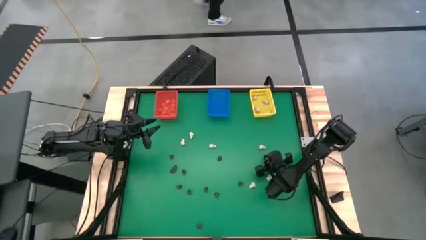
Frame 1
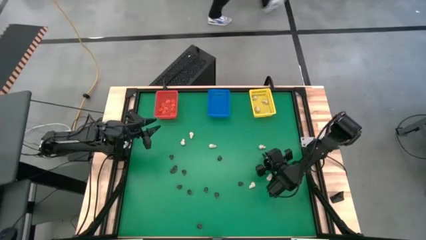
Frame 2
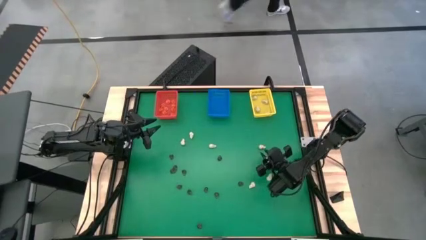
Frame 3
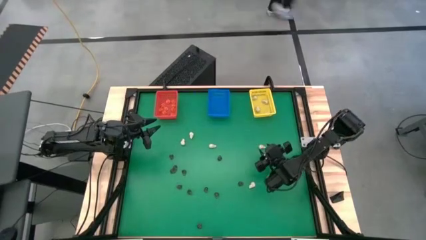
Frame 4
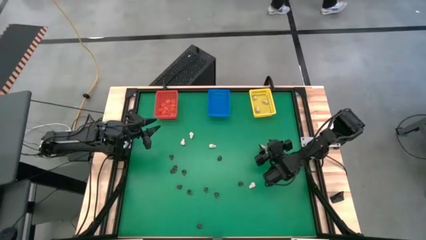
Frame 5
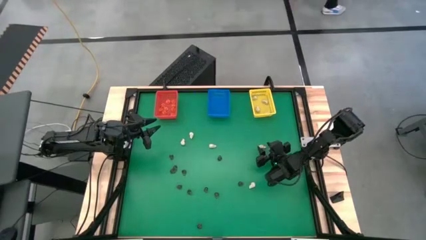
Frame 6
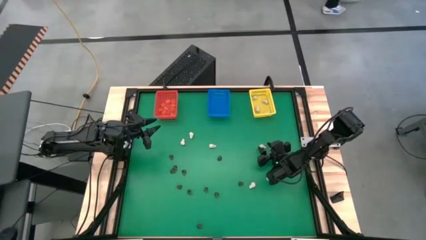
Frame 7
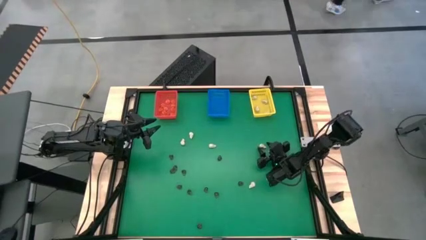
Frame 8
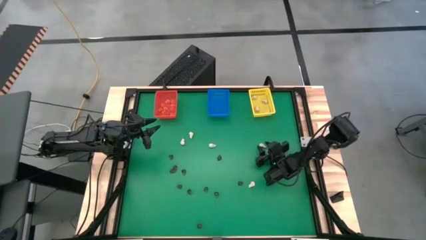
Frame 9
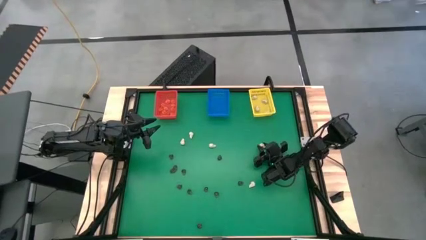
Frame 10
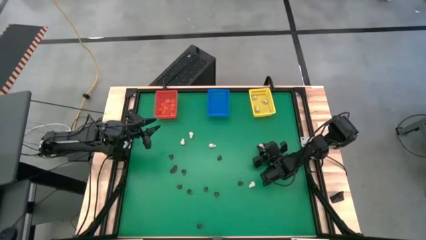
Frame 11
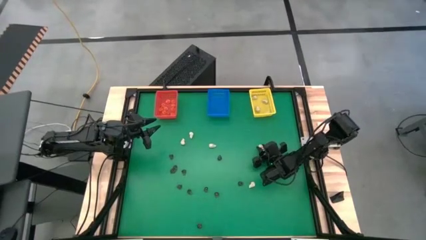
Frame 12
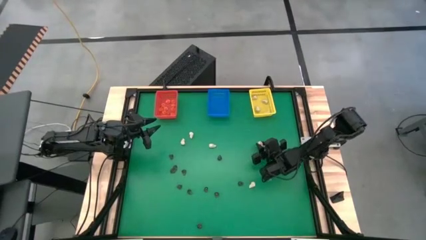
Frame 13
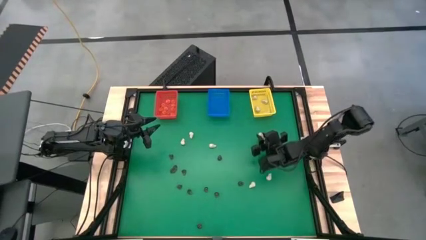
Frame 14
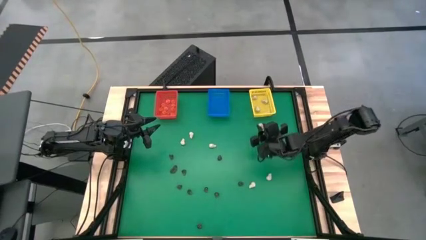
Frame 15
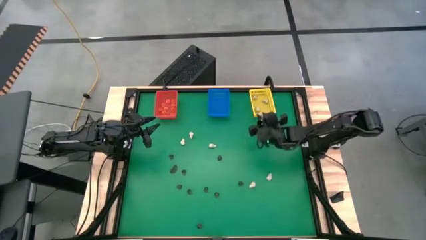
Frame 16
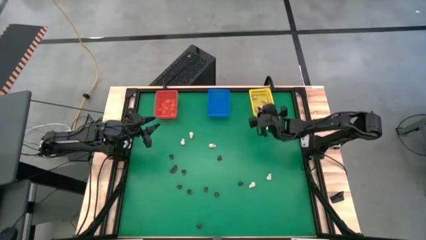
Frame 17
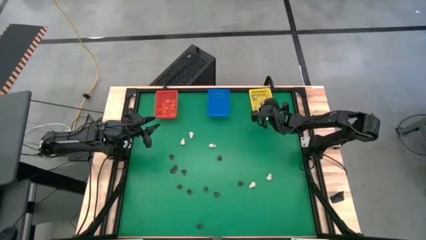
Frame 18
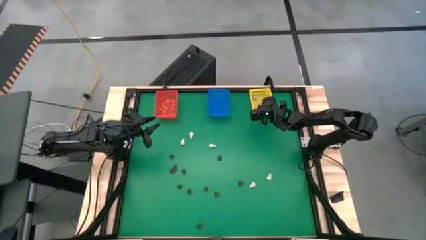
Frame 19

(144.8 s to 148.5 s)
Task: Sort Halloween decoration
Put the white skull toy into the yellow bin

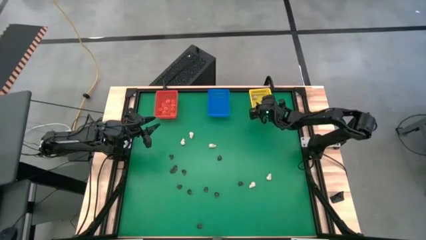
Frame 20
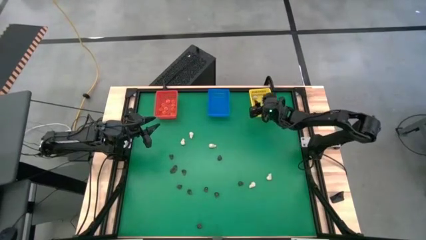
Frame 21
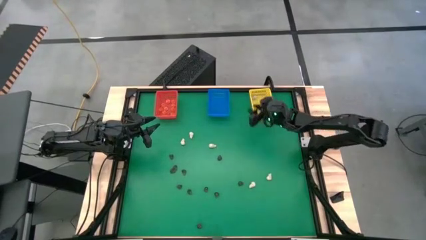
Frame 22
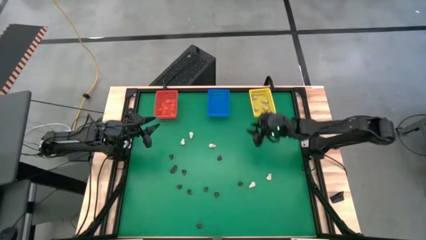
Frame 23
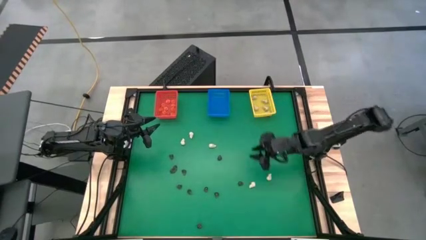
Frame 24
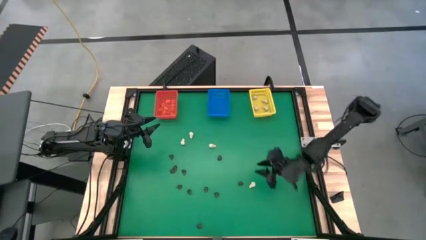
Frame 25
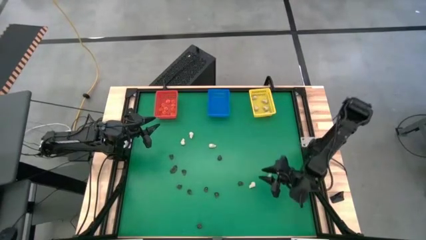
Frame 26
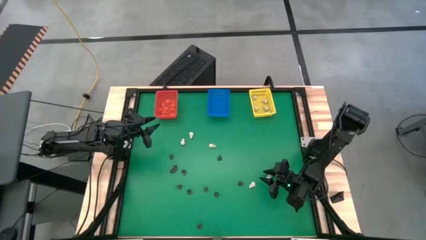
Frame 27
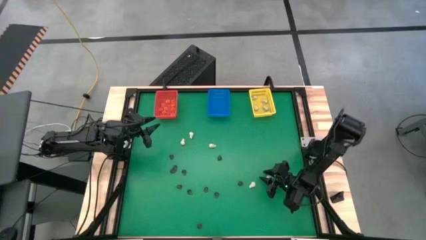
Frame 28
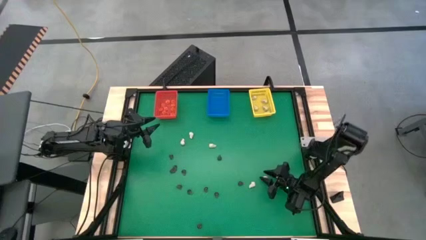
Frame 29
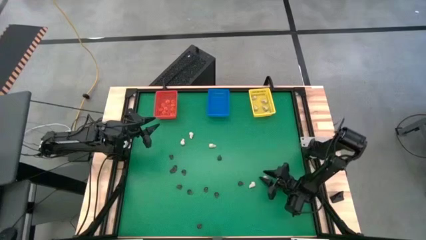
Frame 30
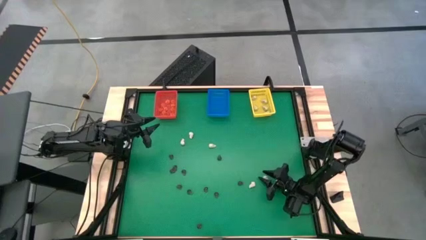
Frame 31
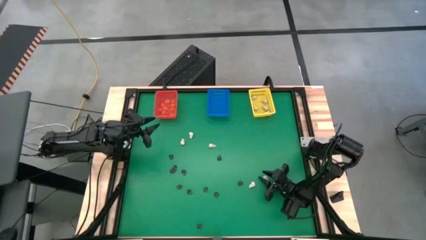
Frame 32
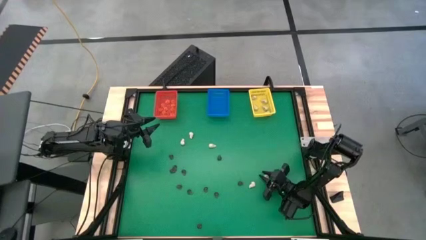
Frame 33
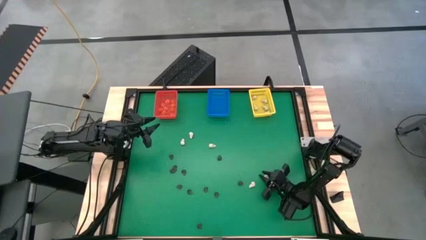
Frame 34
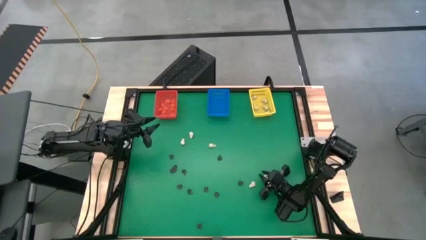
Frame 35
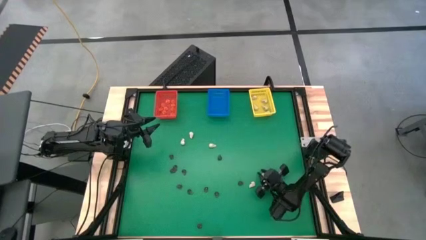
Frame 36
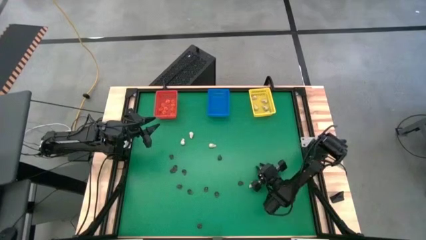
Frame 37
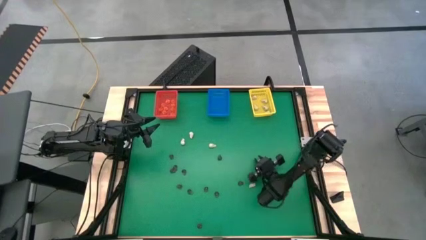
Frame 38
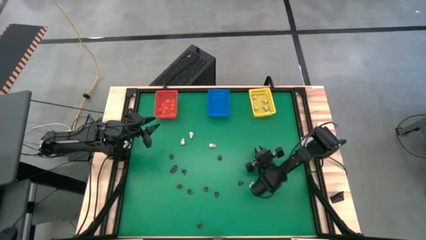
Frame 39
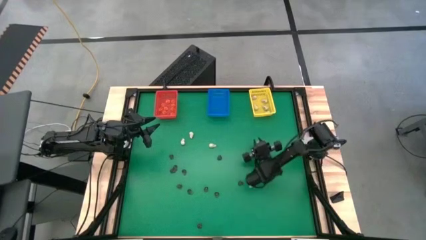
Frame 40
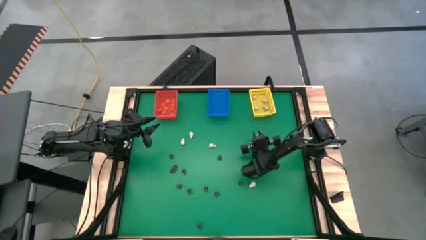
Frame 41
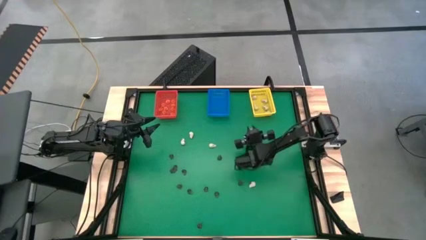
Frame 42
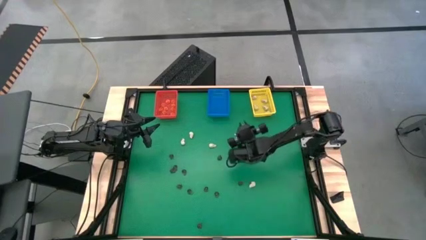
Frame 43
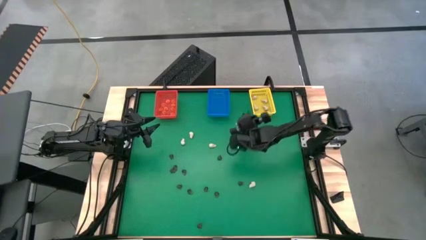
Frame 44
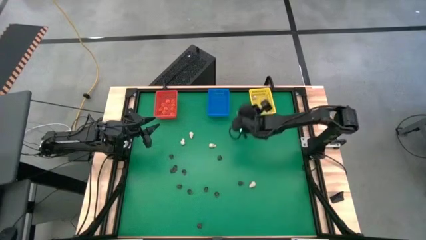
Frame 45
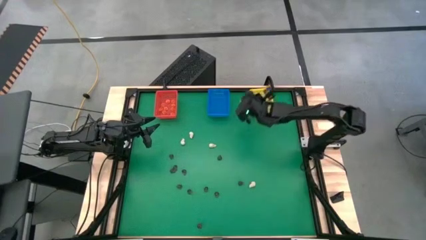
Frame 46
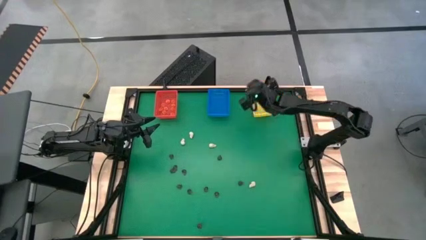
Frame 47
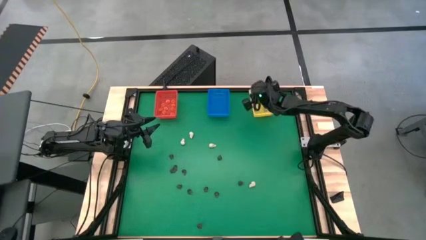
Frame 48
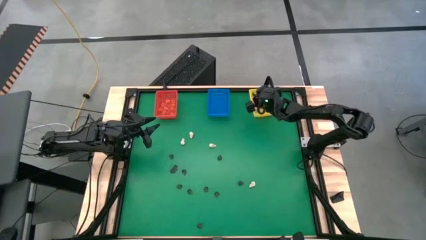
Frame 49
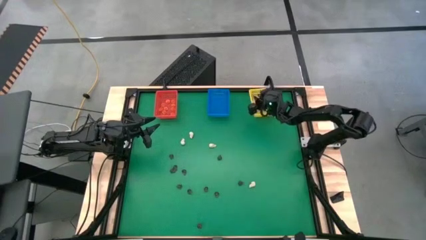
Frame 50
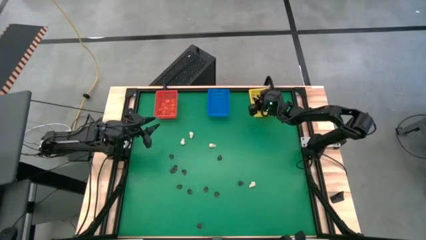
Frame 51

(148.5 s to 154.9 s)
Put the white skull toy into the yellow bin

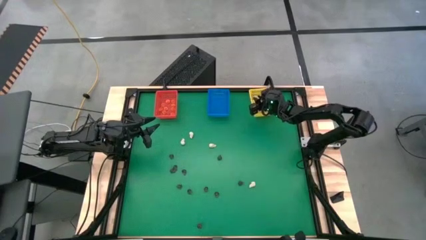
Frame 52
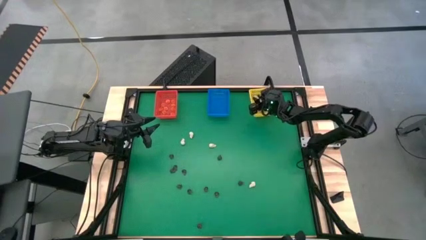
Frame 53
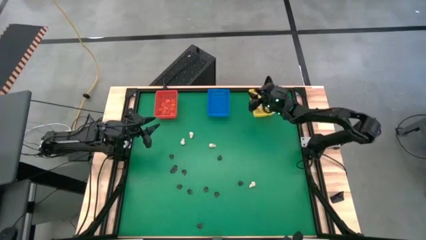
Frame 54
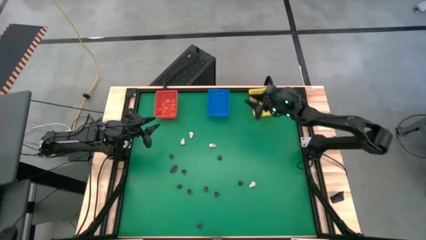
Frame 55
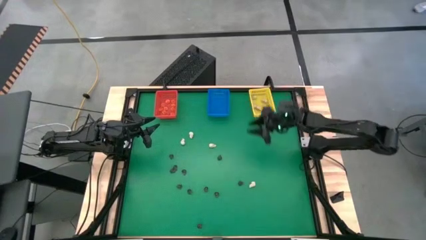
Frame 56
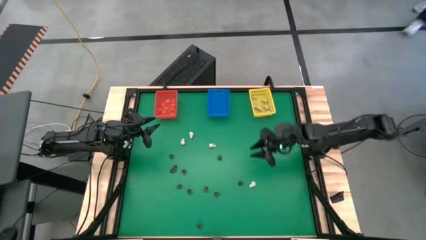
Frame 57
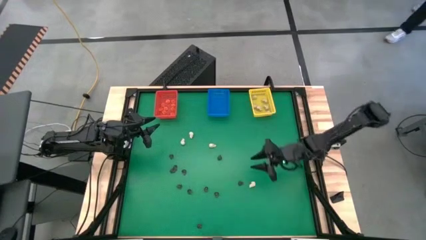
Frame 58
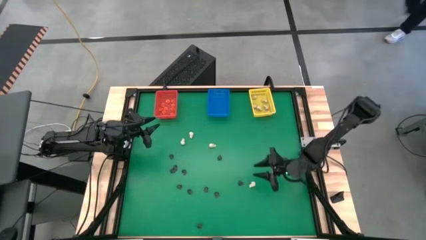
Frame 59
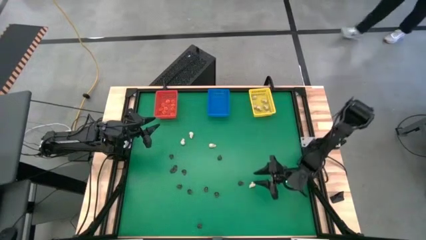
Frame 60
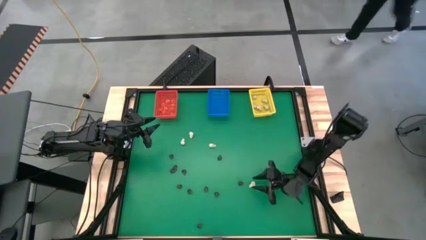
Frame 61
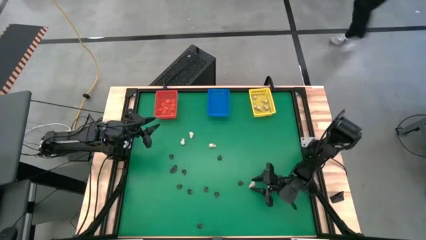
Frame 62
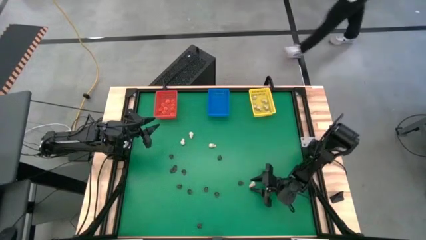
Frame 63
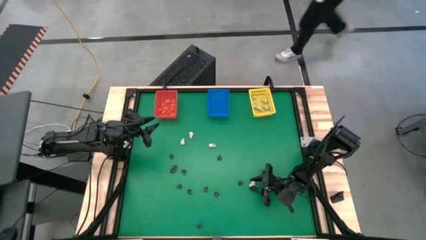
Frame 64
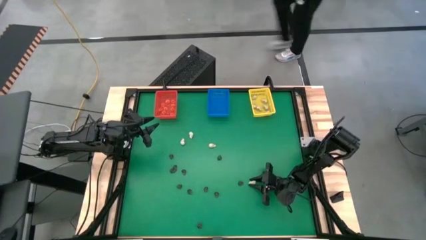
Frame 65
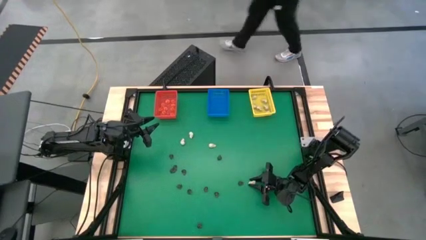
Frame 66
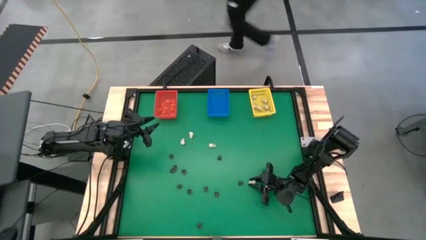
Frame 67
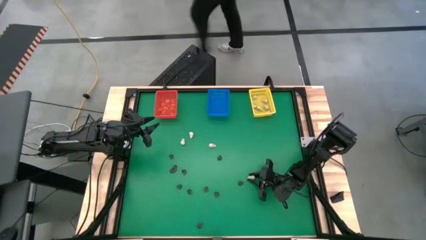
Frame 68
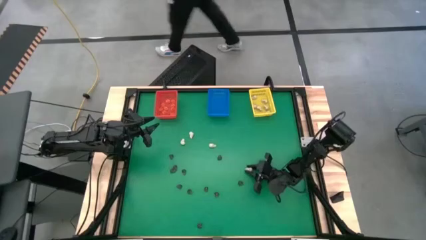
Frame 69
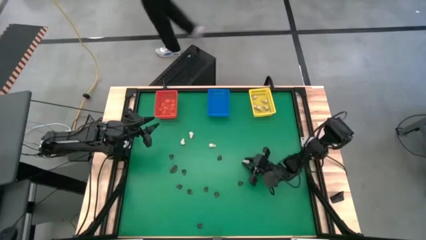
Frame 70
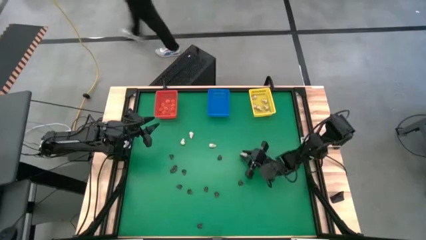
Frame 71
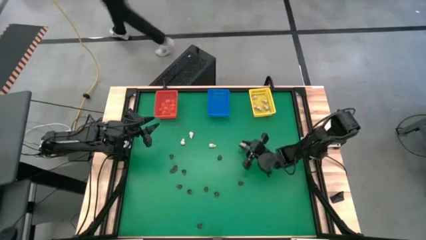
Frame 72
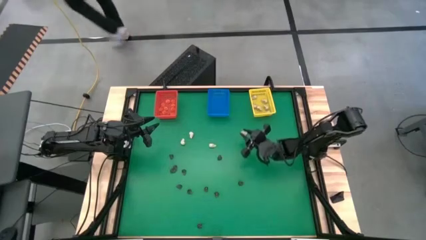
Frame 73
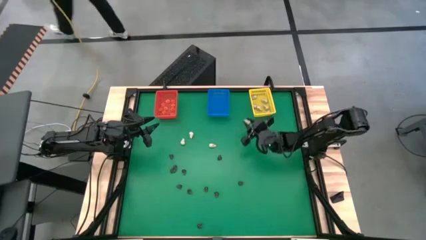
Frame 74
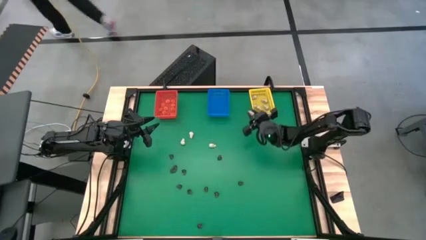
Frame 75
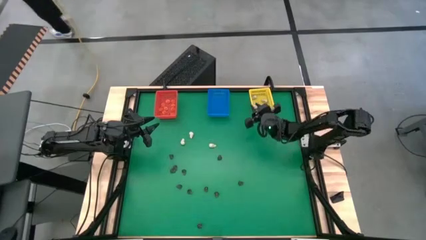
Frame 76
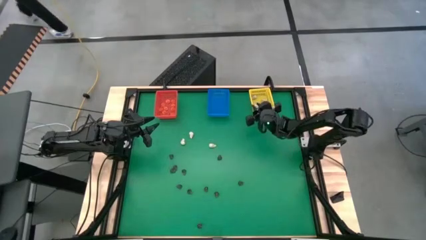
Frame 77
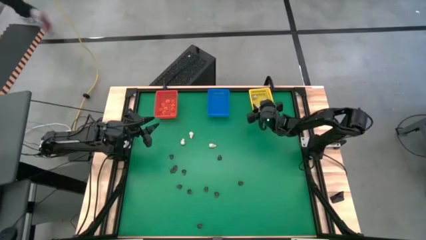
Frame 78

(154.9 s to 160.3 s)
Put the white skull toy into the yellow bin
